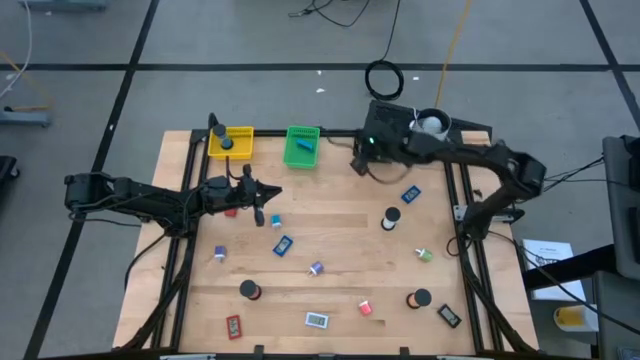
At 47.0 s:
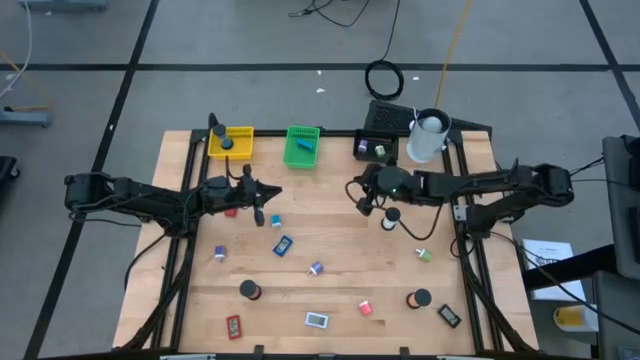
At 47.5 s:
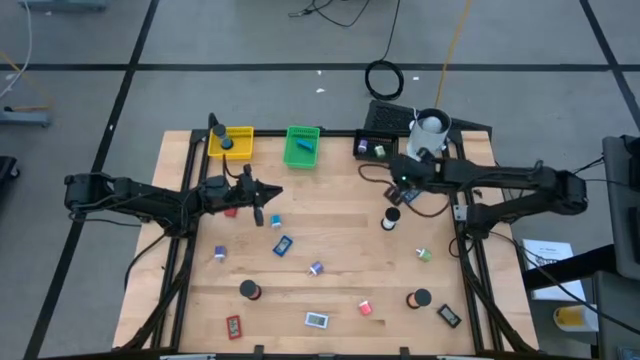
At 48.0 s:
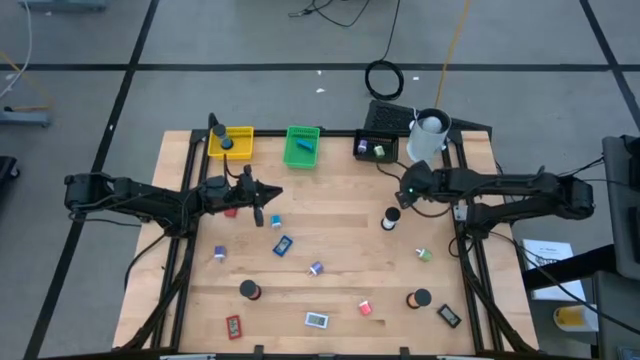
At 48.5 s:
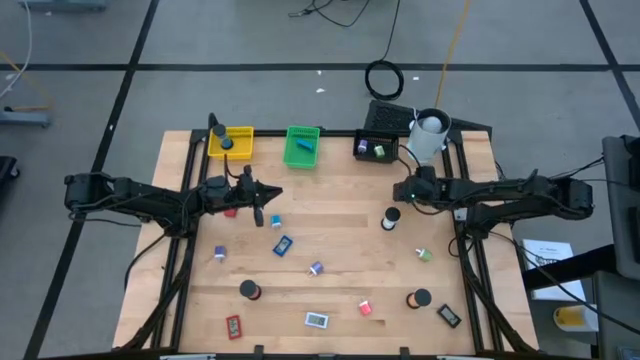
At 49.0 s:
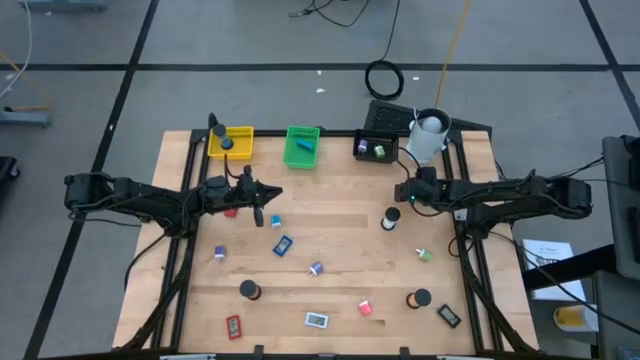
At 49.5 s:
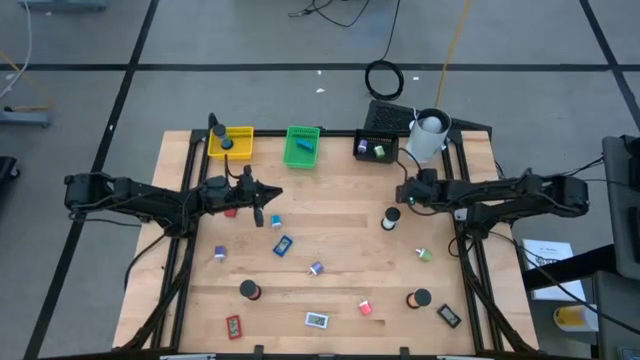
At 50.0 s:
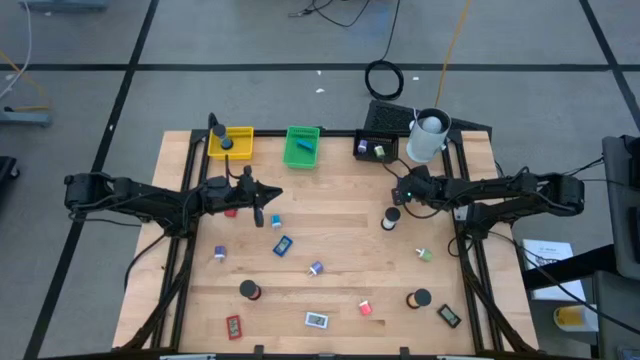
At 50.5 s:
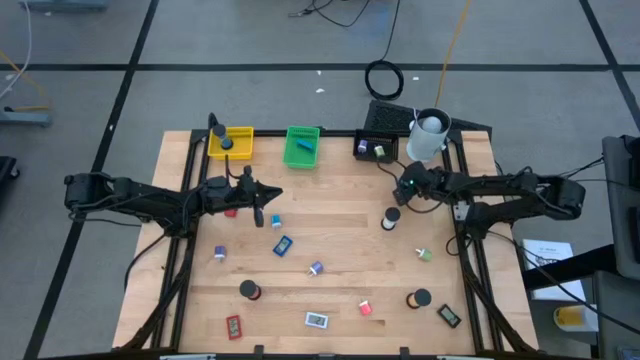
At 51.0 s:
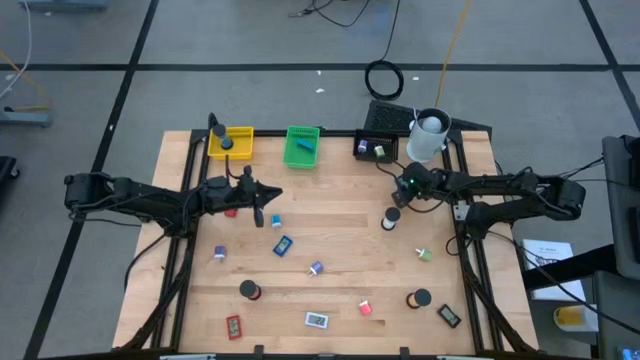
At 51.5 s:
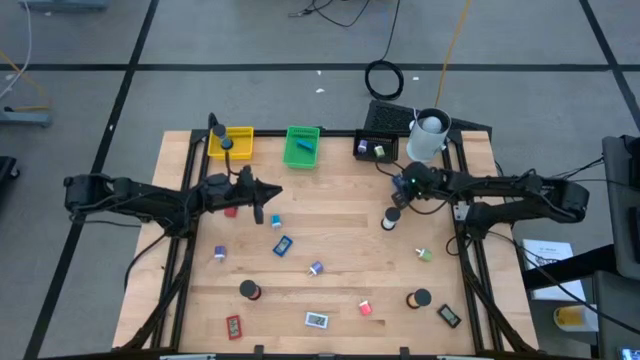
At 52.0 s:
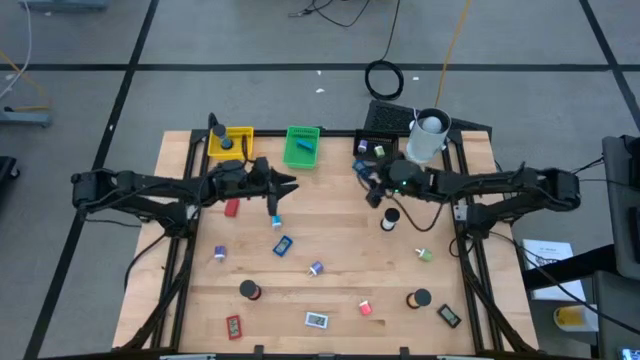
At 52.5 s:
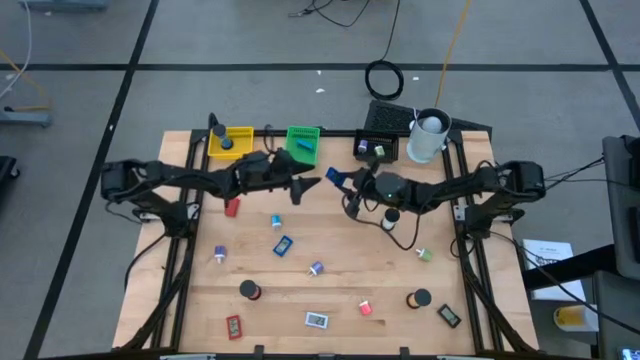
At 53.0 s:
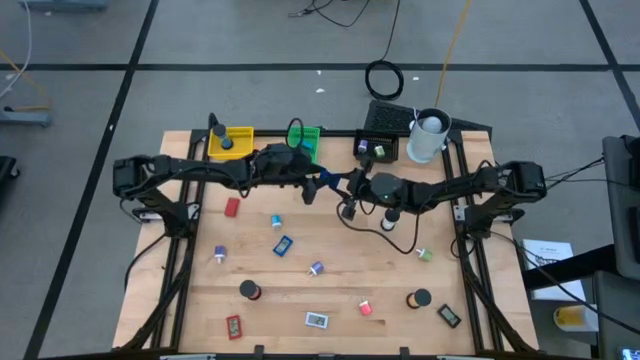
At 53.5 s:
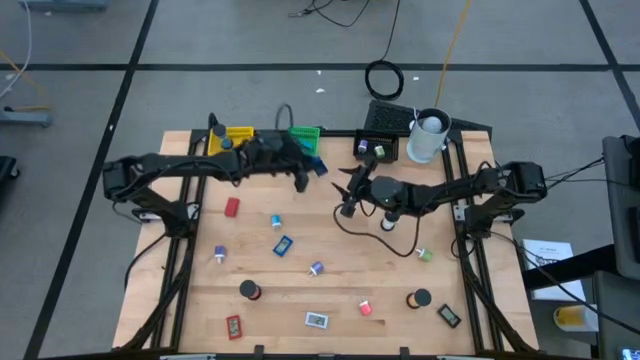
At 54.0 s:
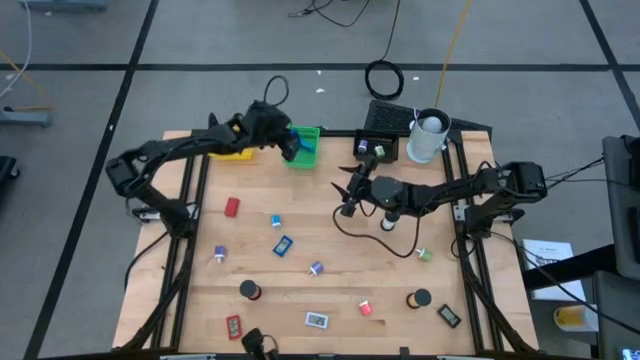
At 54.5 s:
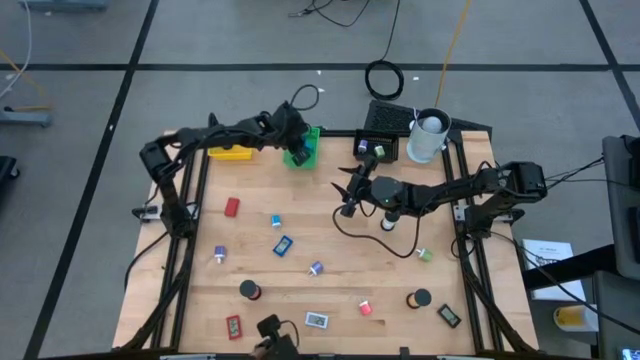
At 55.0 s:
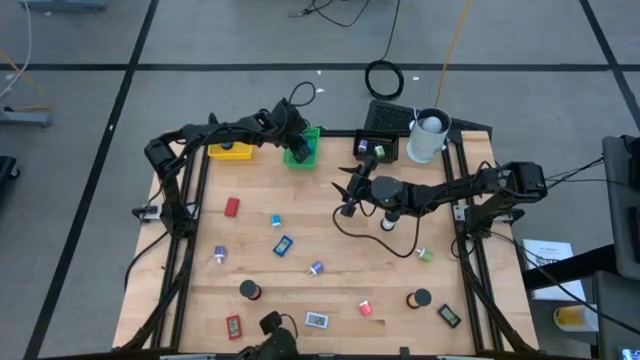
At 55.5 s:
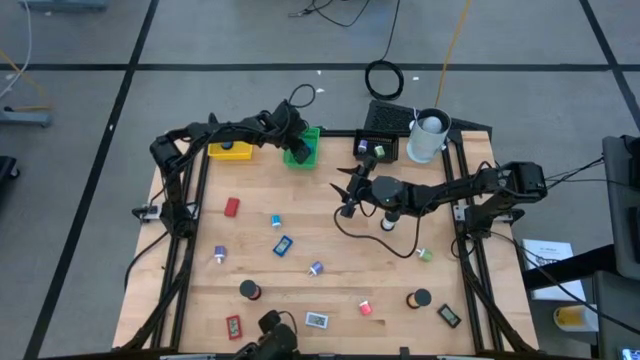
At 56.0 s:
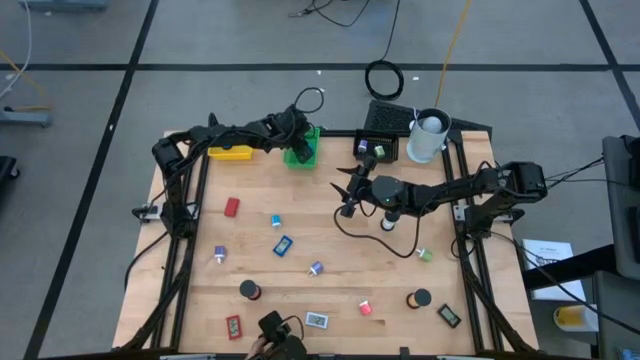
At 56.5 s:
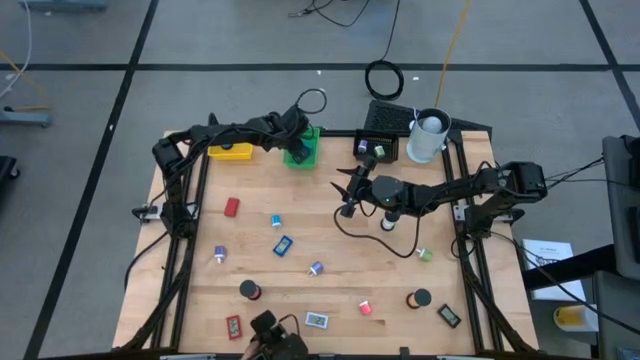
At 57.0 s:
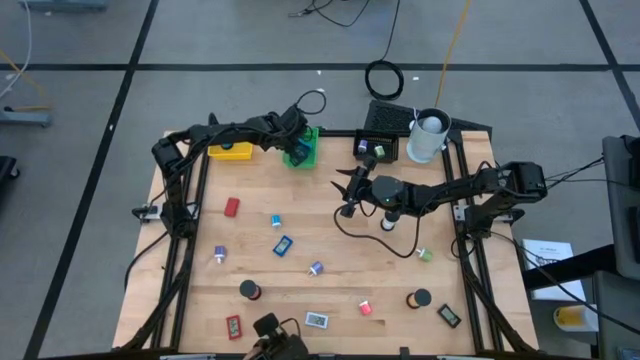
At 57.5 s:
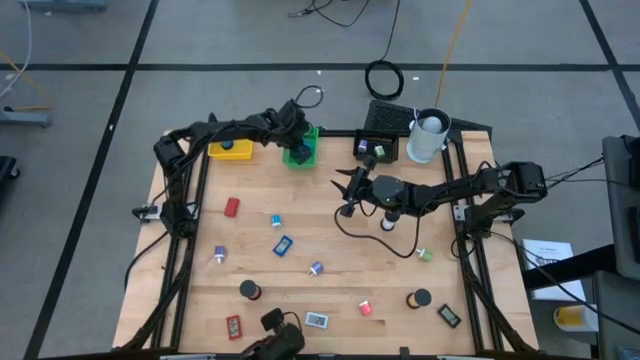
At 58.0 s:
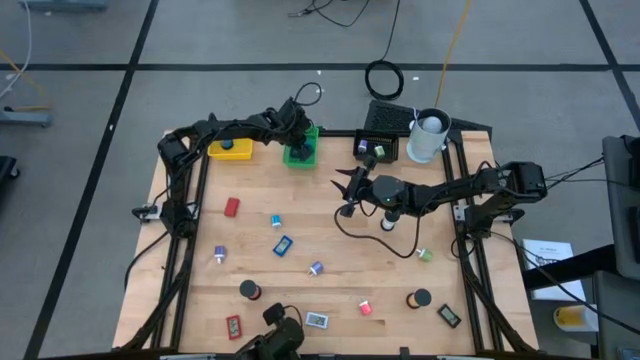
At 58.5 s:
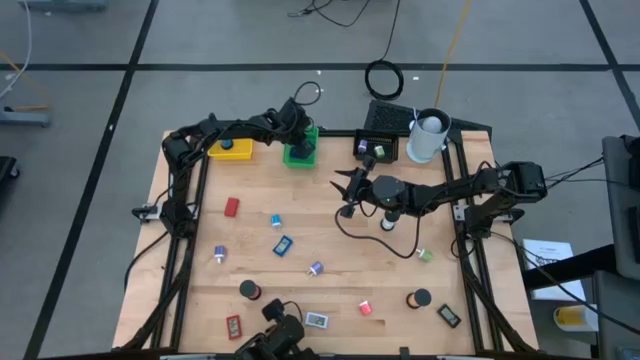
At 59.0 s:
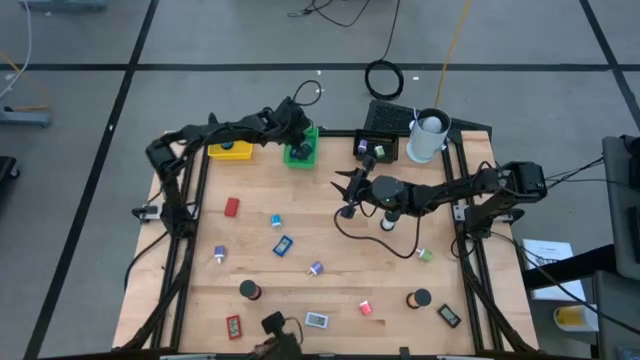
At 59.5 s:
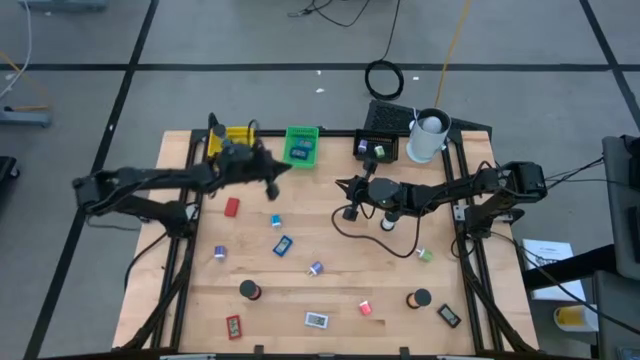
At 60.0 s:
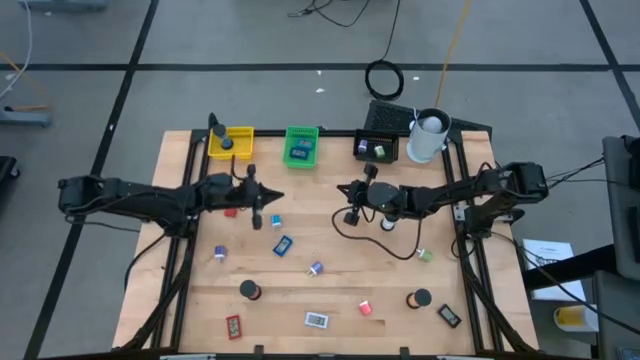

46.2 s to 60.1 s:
Task: Pick & Place Office items
Put the right blue digital timer into the green bin

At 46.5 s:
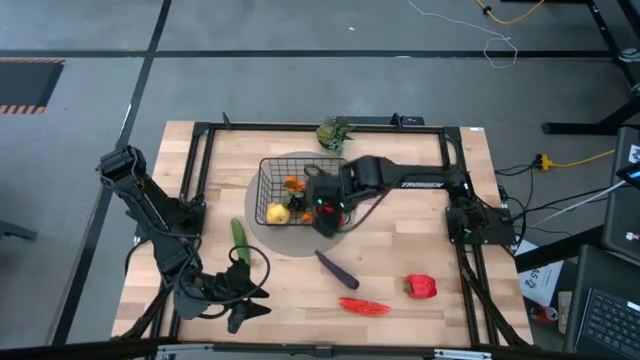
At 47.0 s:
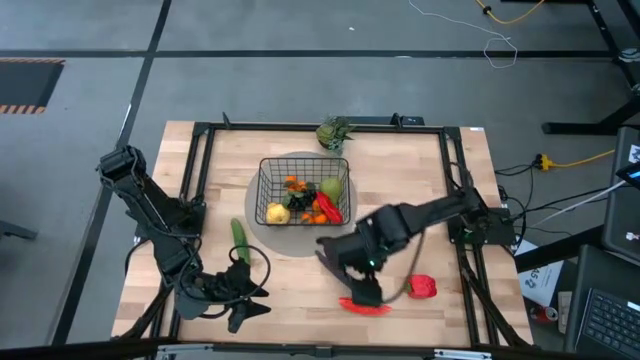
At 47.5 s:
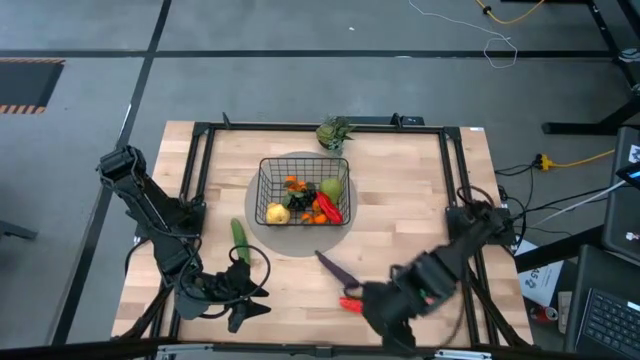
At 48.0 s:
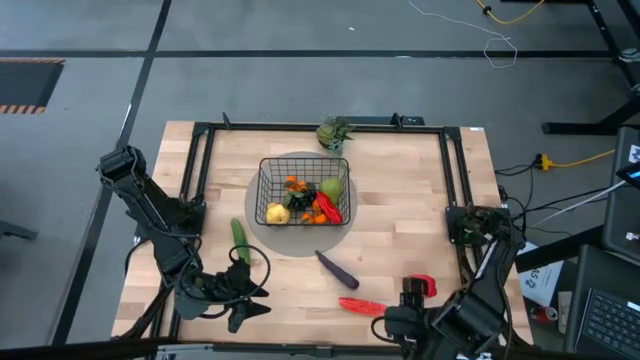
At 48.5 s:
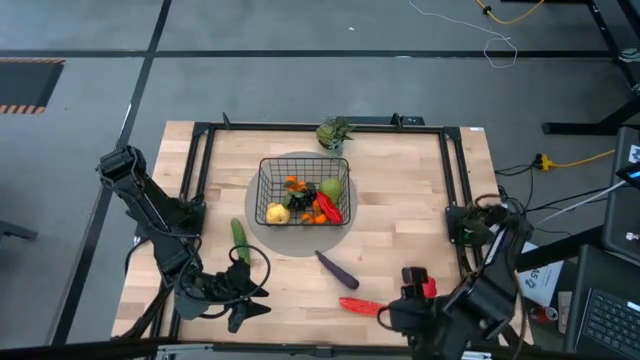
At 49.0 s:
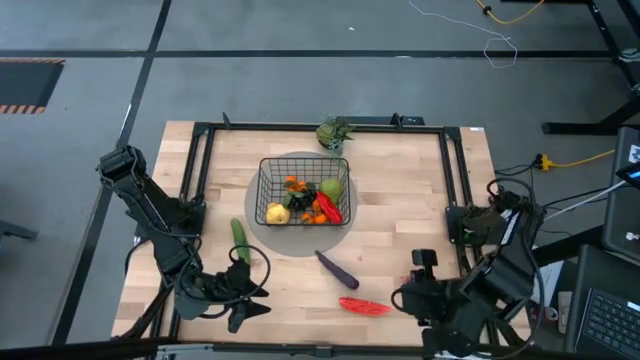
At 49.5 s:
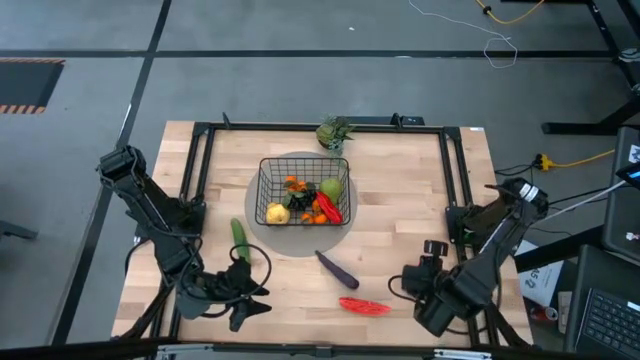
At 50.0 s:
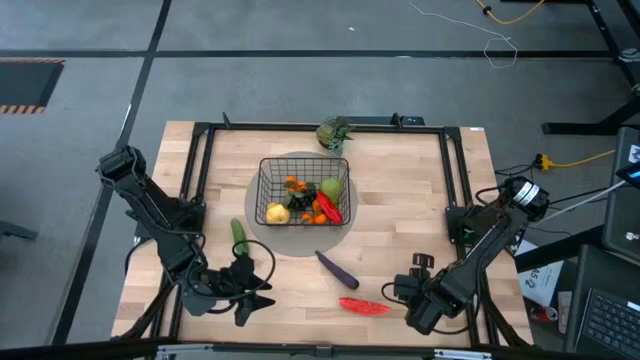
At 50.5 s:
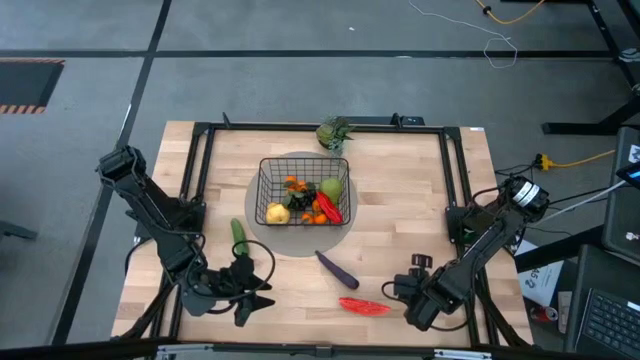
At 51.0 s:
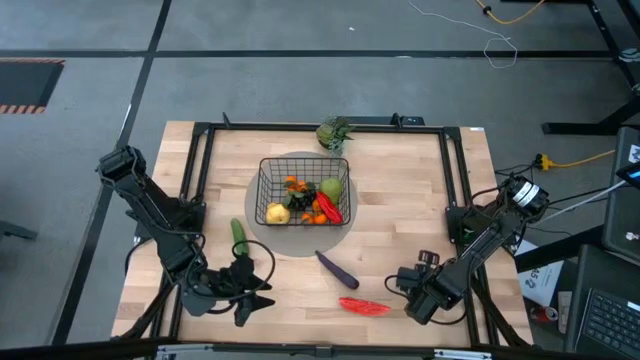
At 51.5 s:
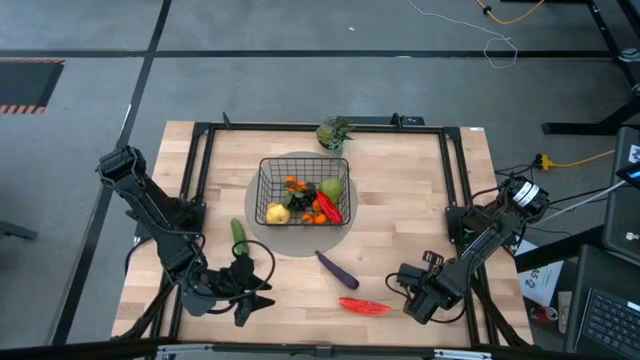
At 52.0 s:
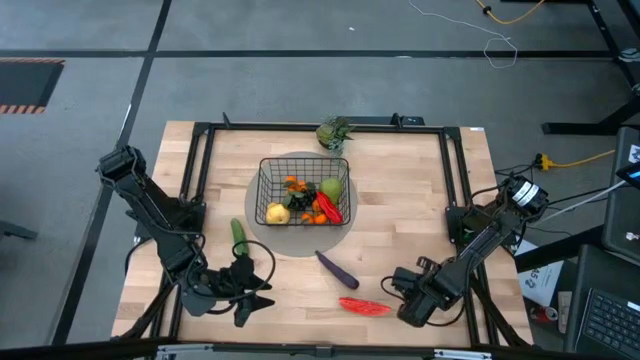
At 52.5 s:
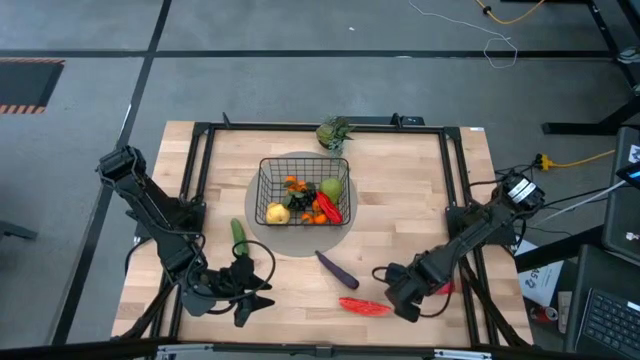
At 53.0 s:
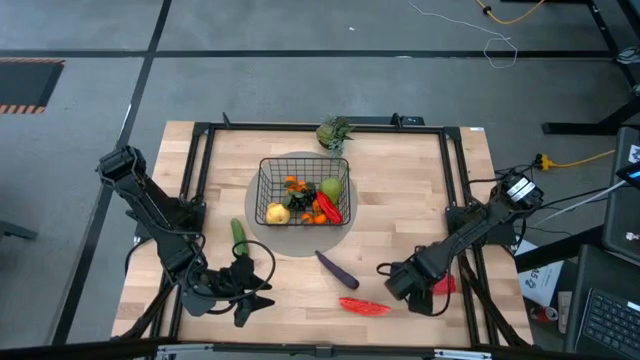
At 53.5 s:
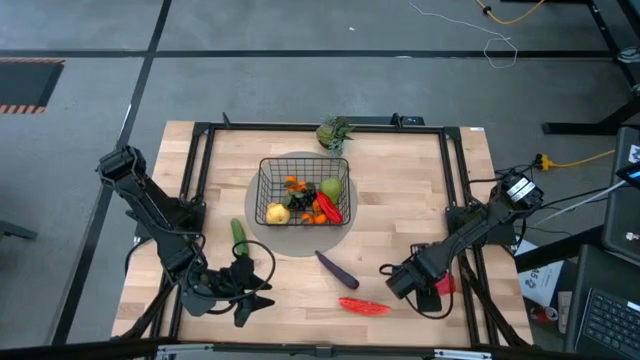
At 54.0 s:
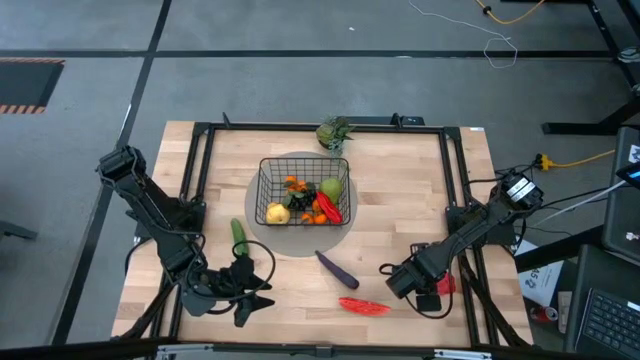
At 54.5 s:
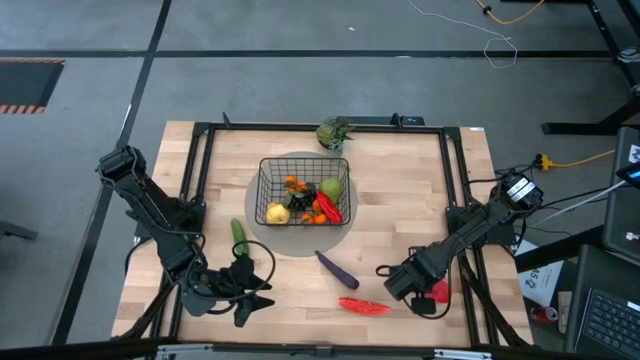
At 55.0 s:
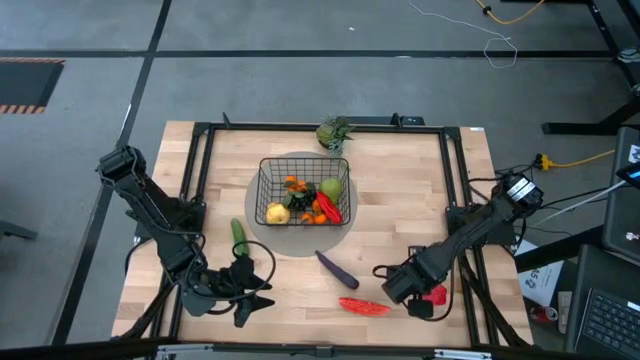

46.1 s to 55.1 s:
Task: Build produce basket
Put the red bell pepper into the black wire basket
